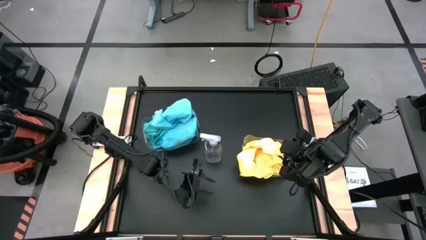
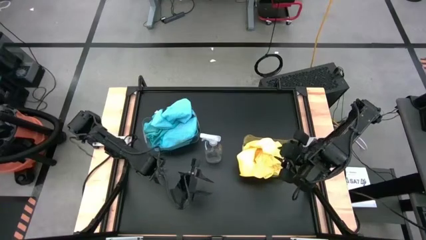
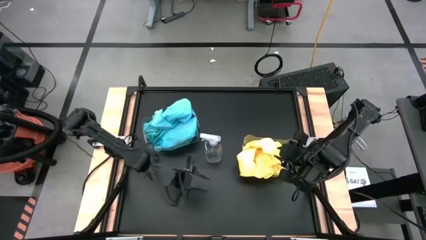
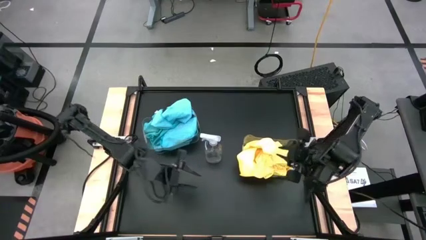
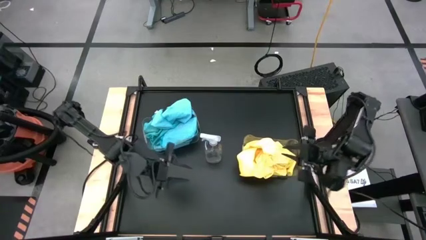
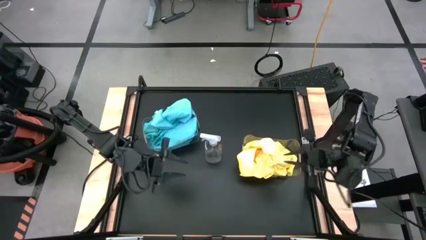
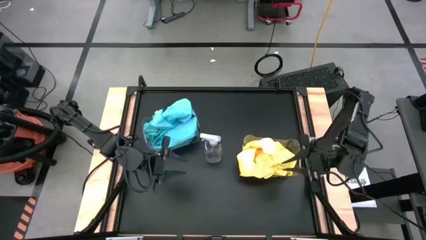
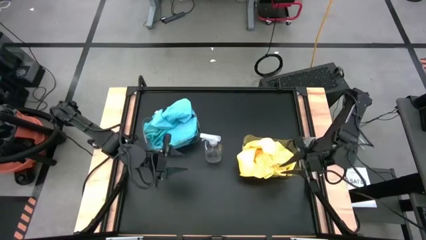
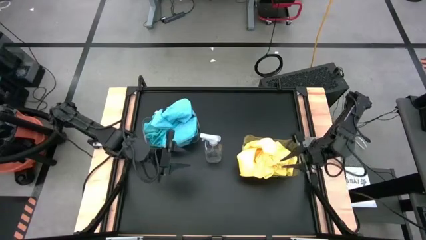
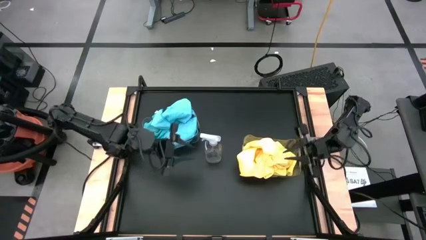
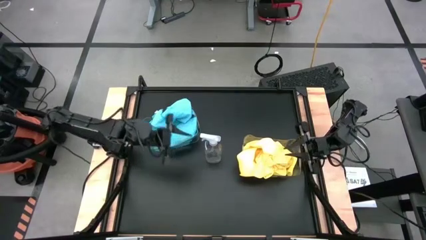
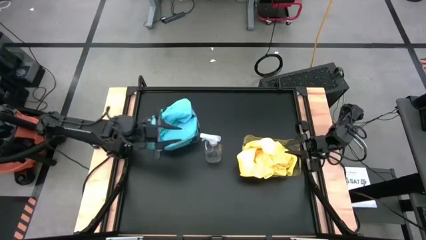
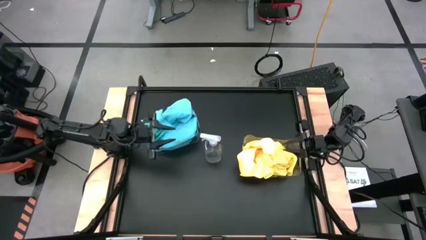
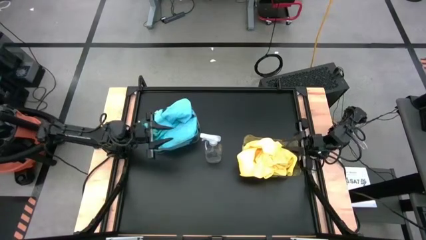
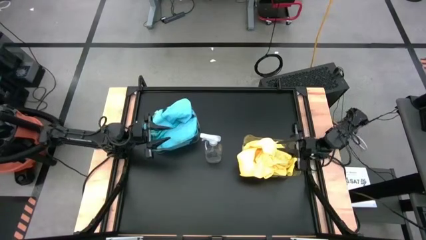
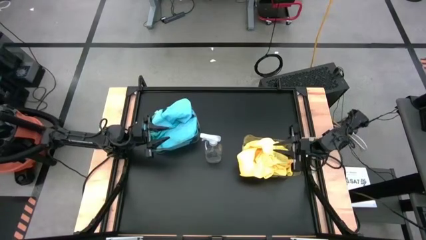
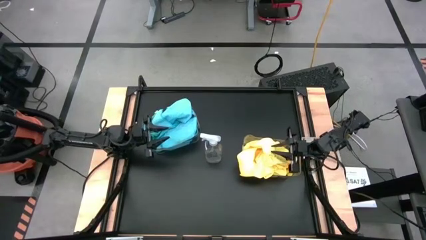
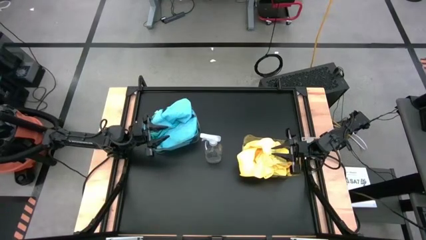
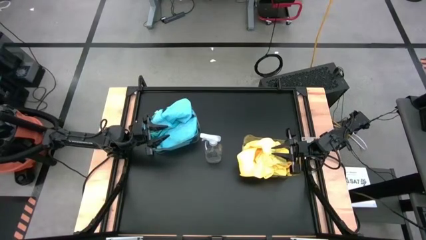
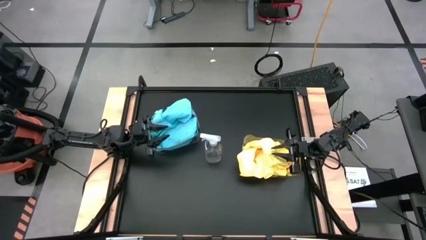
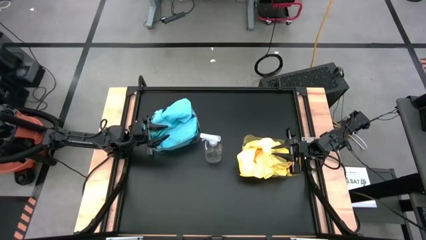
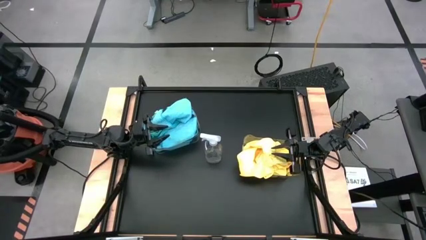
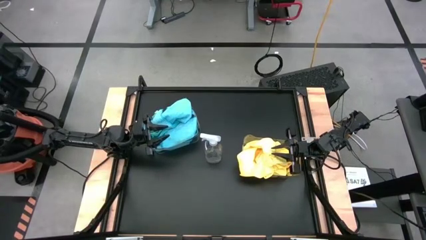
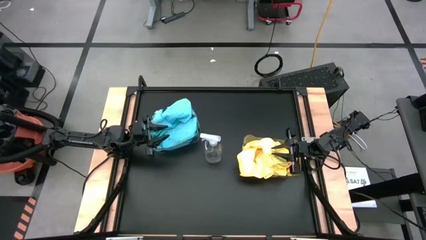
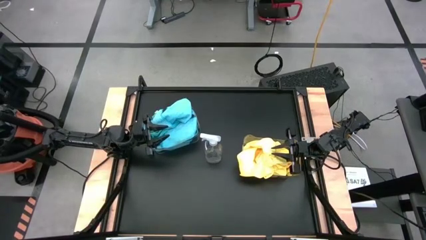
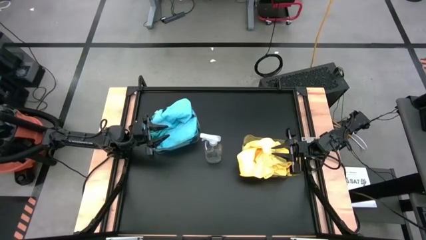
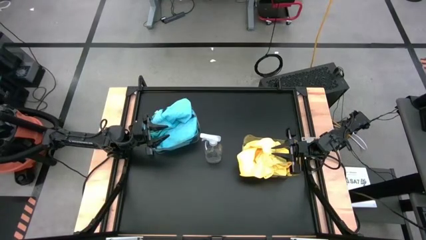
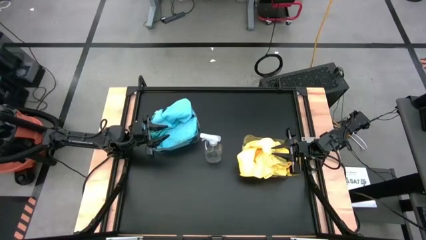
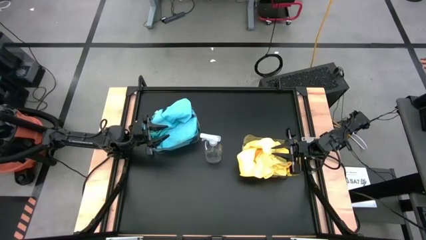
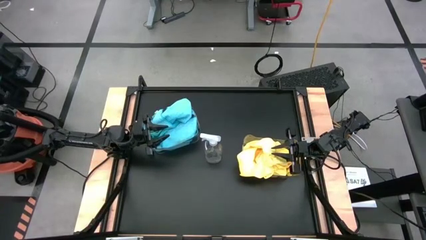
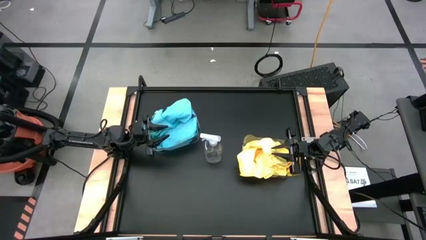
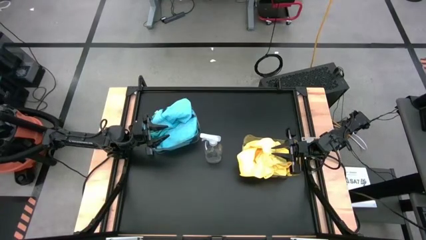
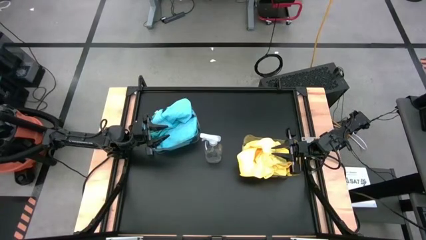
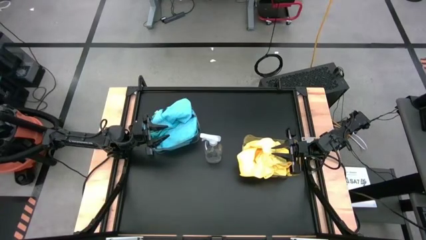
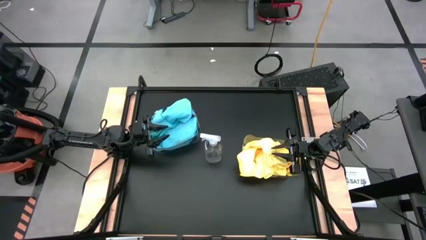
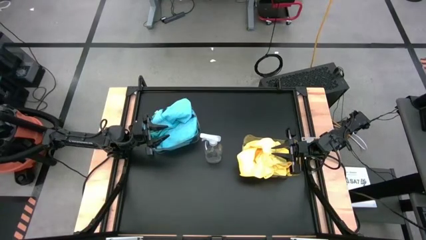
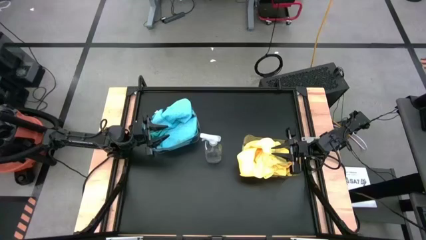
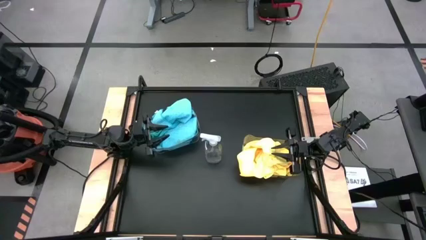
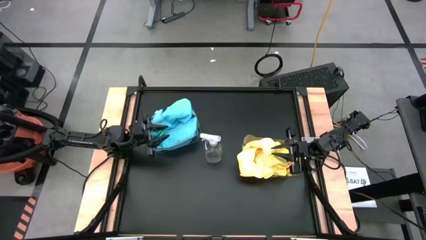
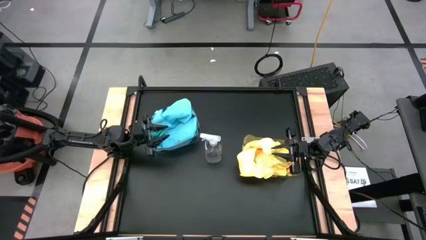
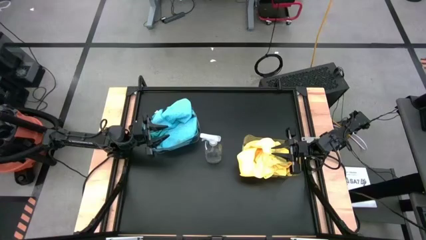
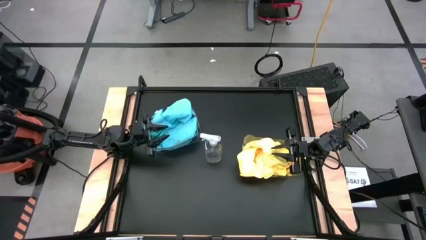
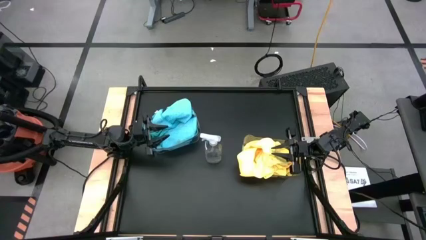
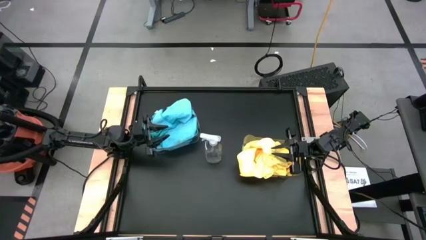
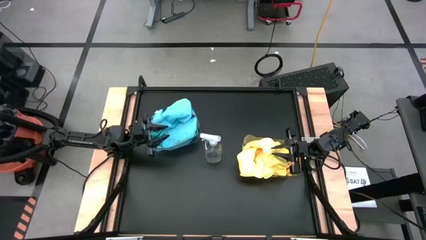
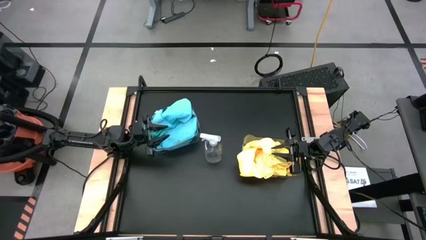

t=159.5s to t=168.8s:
Task: Sort microfiber towel by color & place in baskets
Return to Home Position

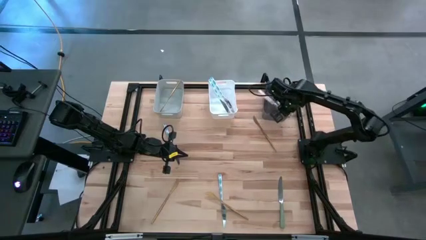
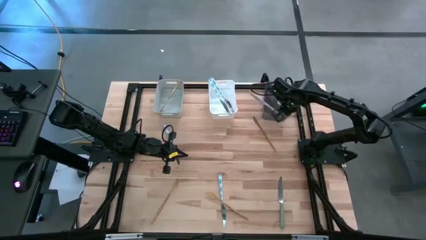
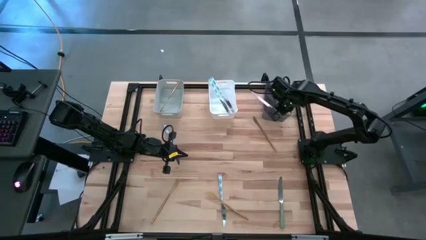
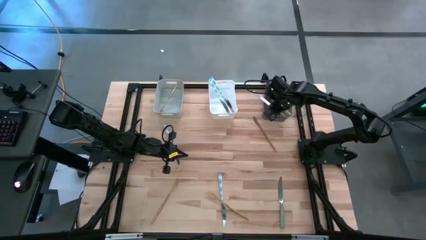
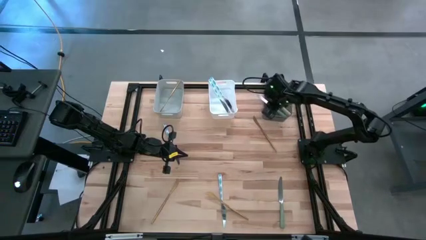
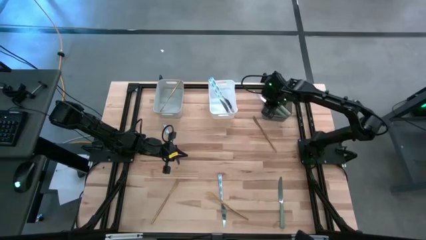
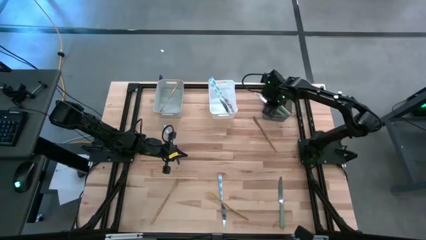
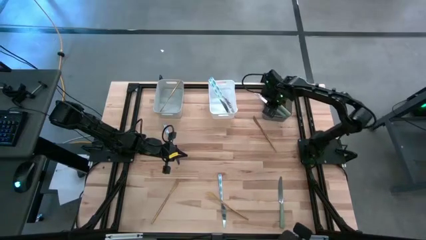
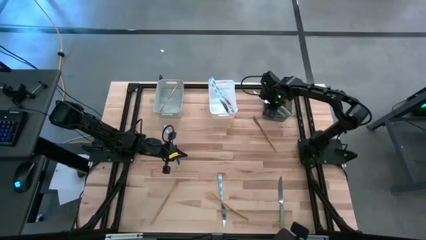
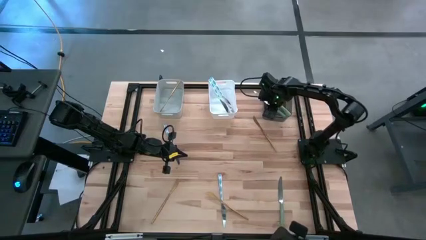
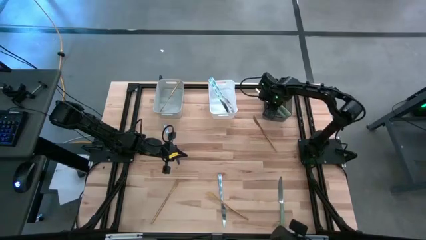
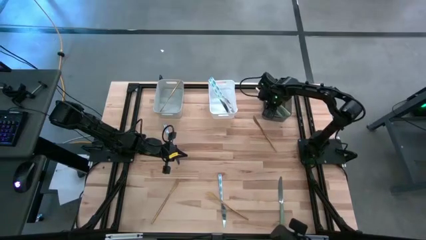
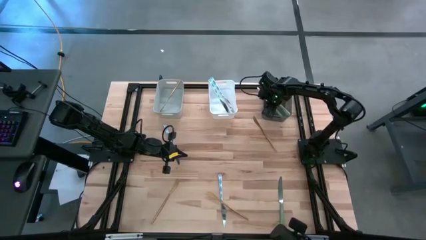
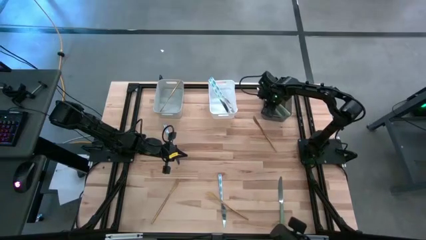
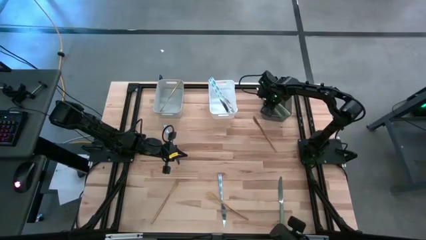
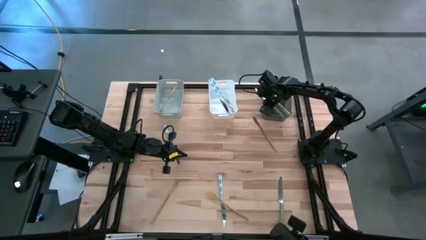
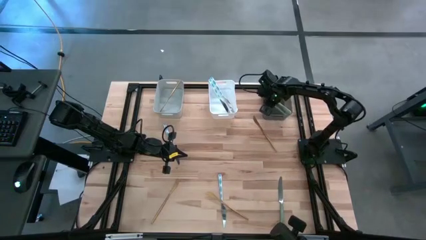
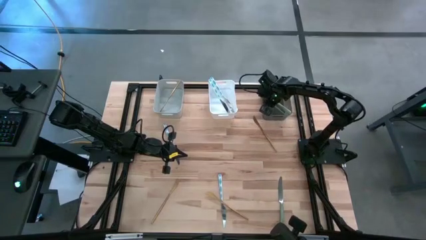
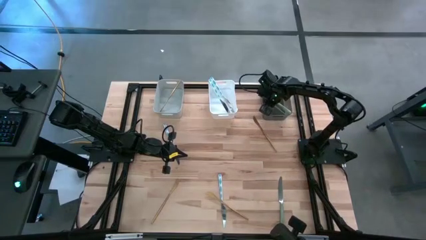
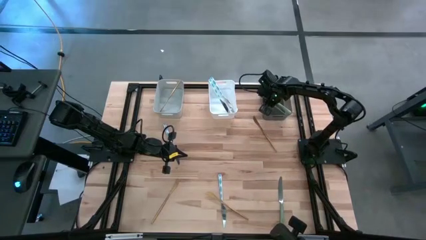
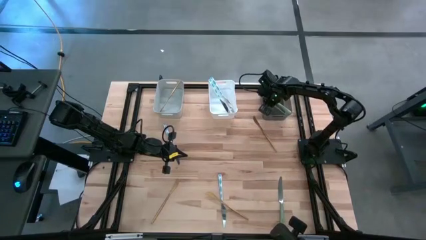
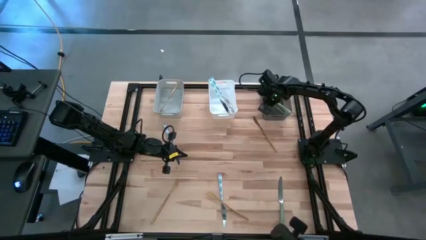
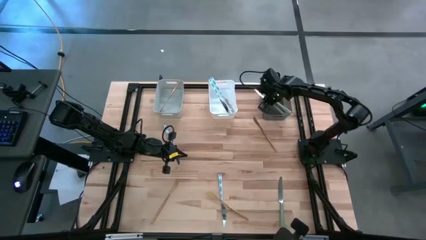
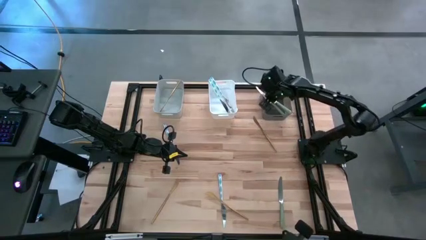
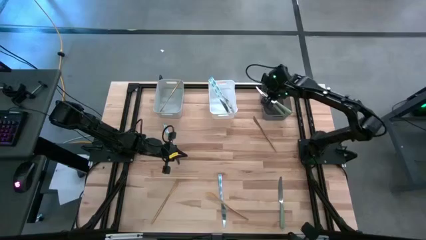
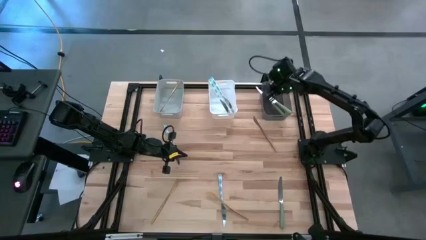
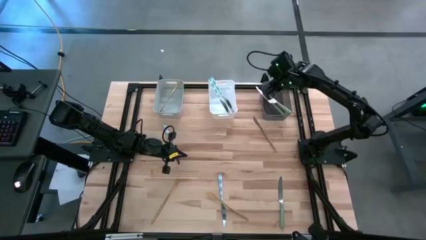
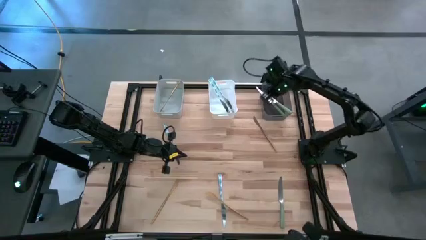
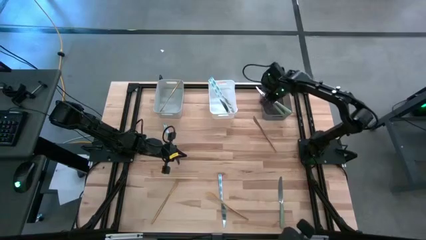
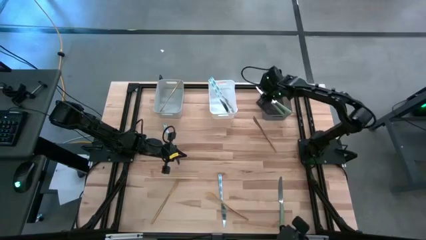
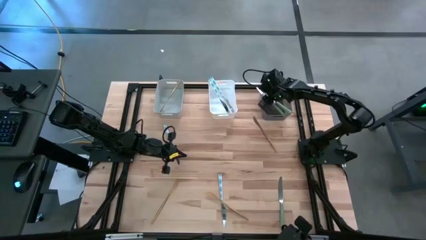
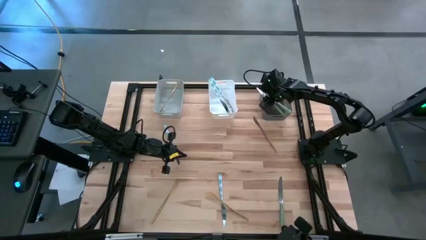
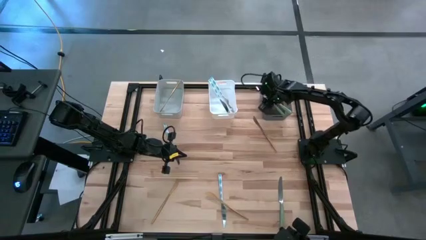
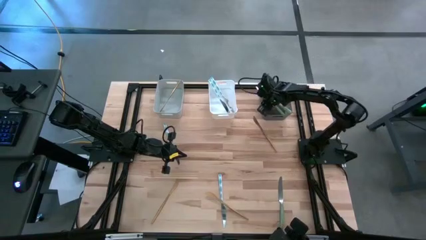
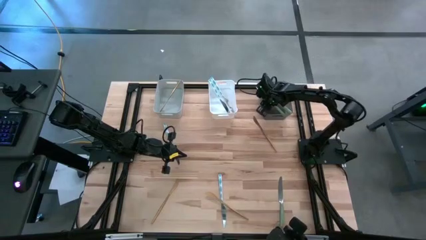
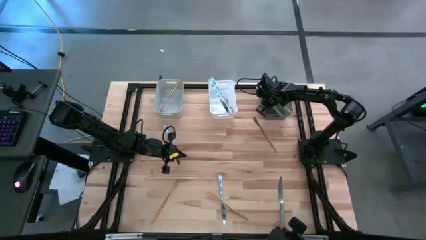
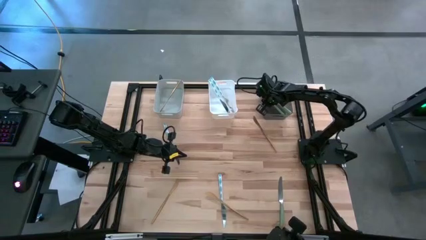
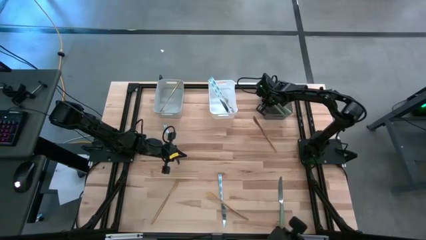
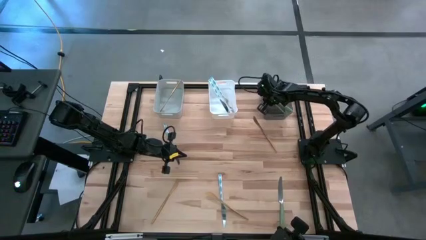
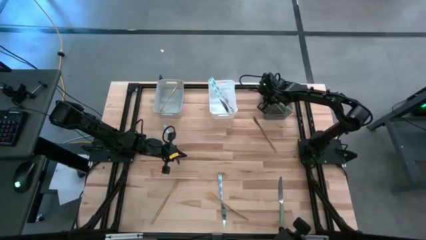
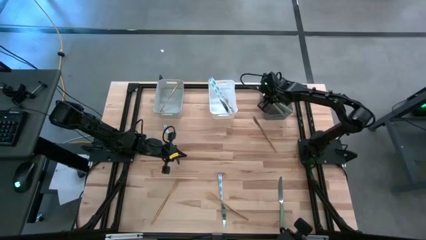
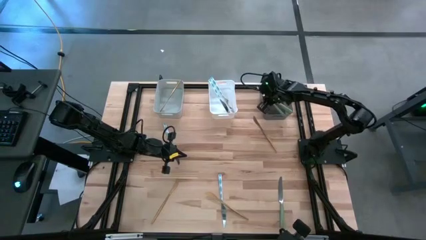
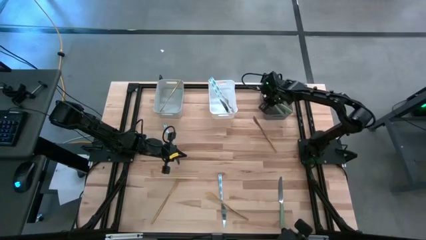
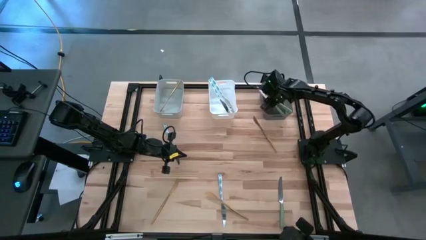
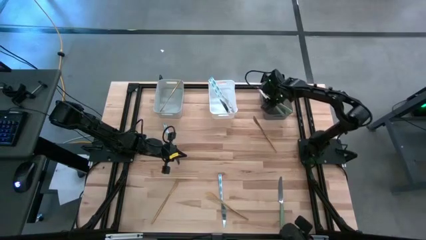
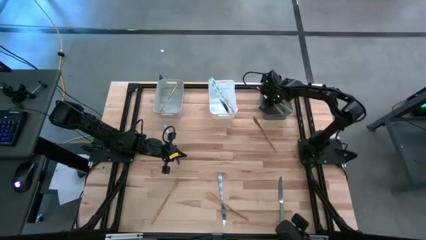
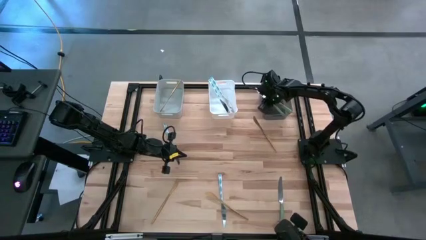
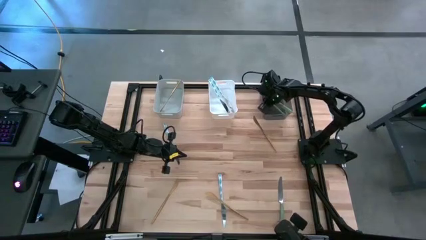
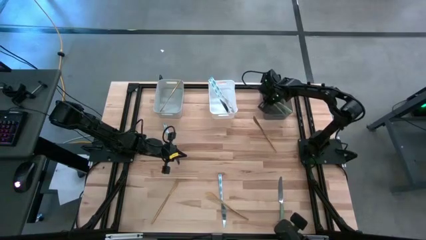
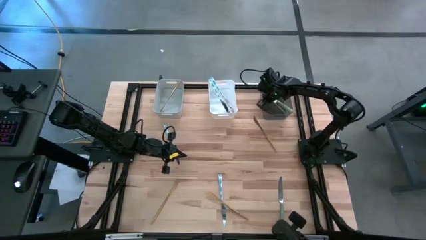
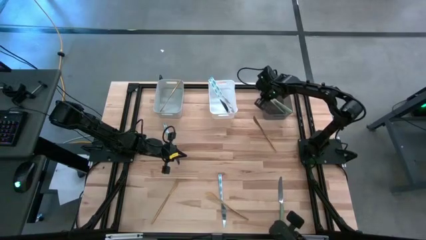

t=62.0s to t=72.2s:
Task: Sort silverware by color (type)
Adjust the green table knives in the bin
